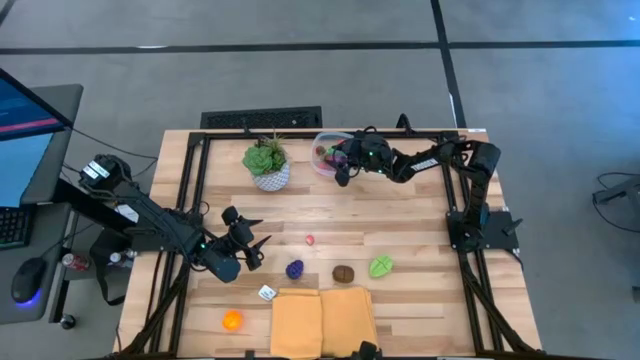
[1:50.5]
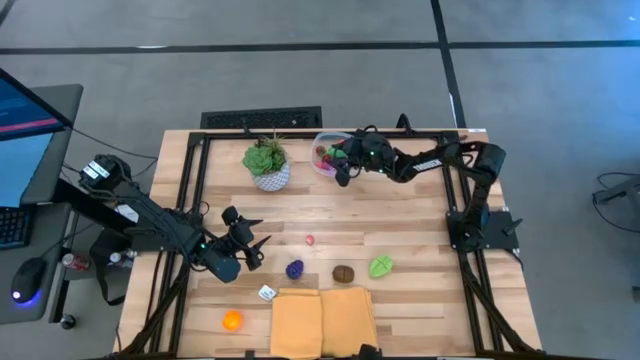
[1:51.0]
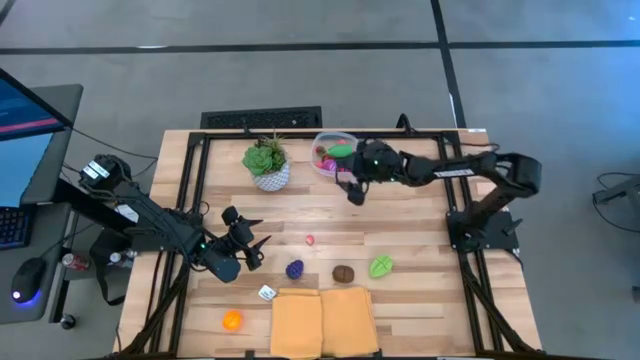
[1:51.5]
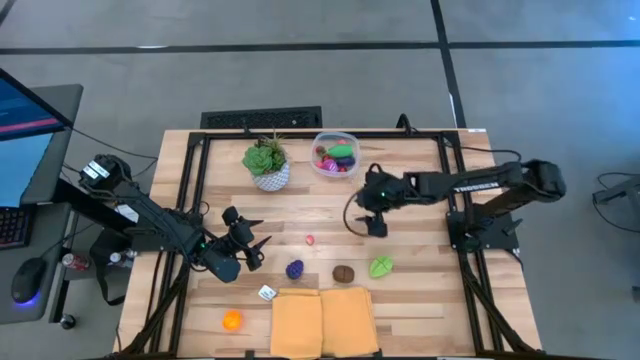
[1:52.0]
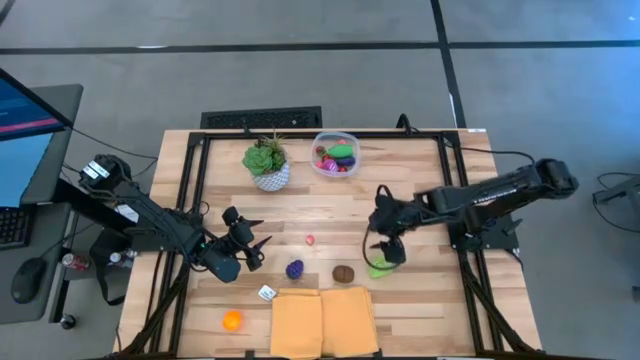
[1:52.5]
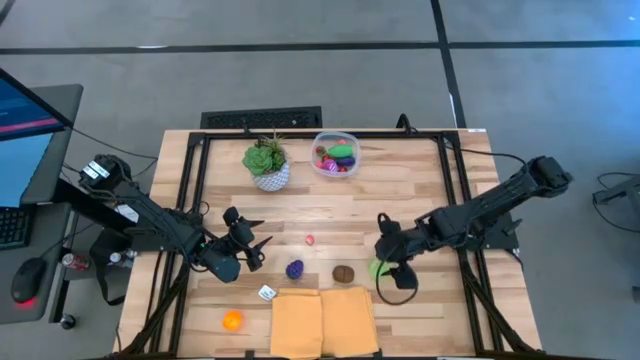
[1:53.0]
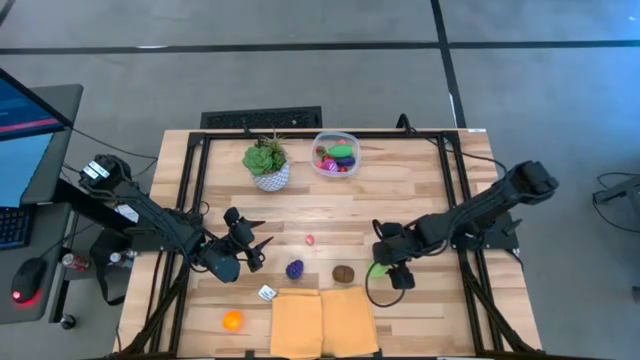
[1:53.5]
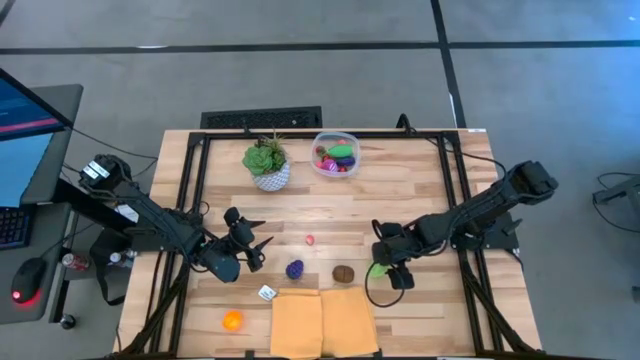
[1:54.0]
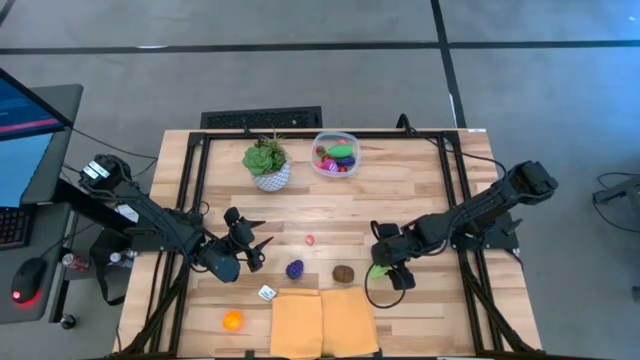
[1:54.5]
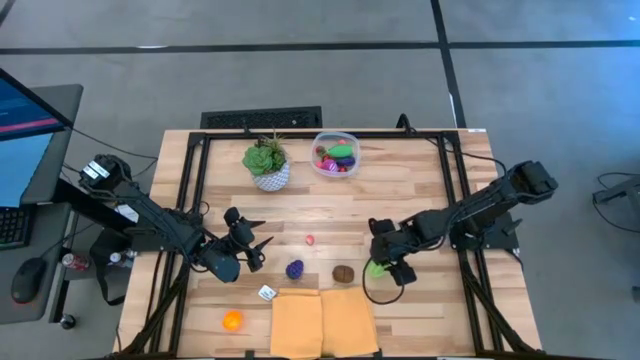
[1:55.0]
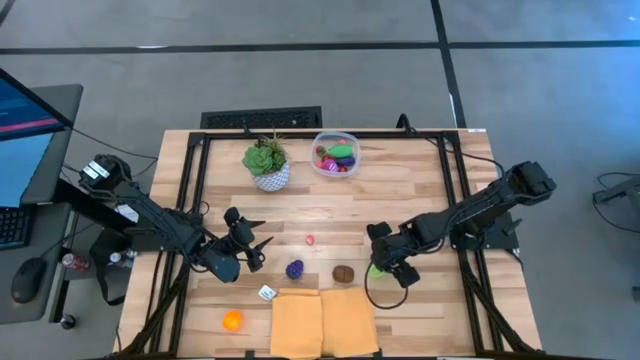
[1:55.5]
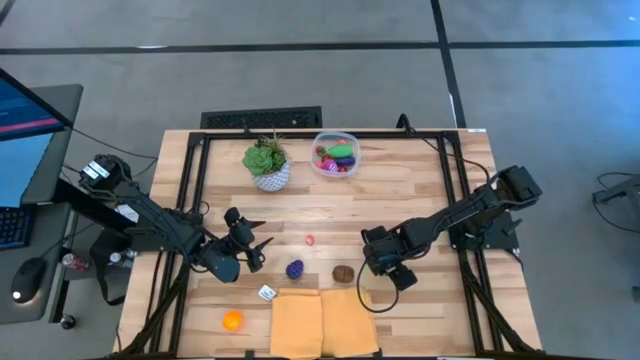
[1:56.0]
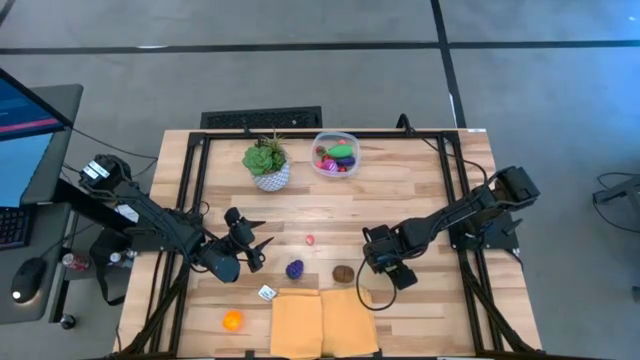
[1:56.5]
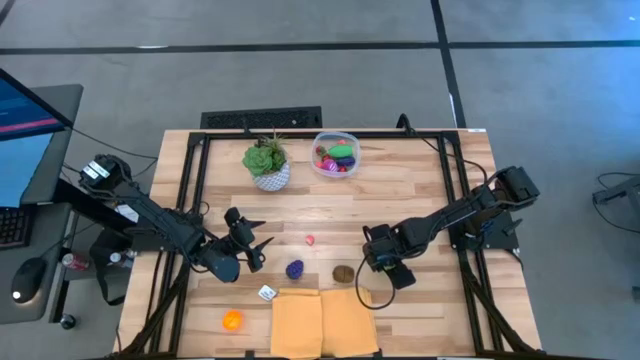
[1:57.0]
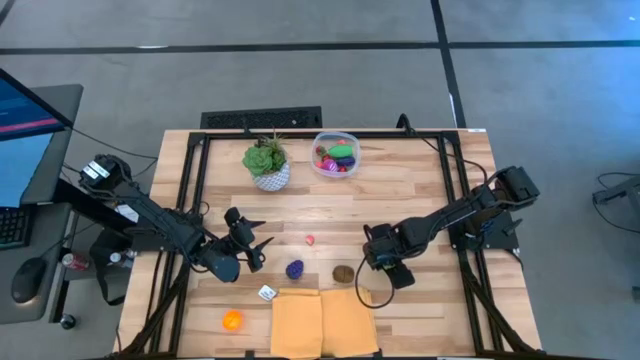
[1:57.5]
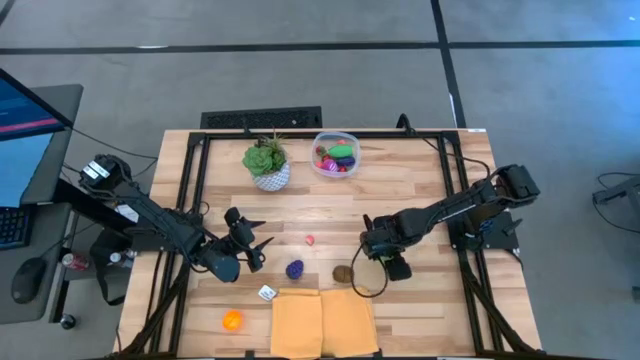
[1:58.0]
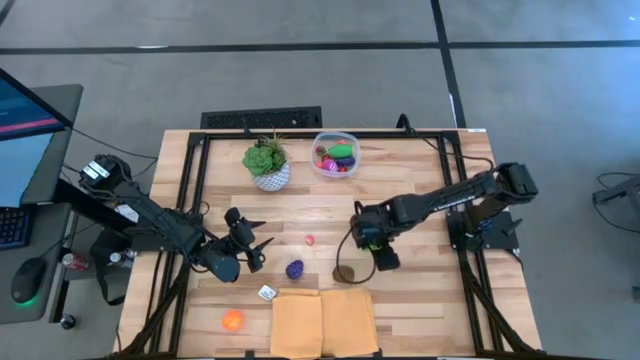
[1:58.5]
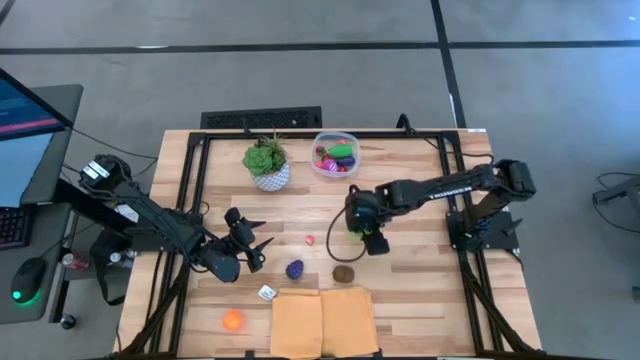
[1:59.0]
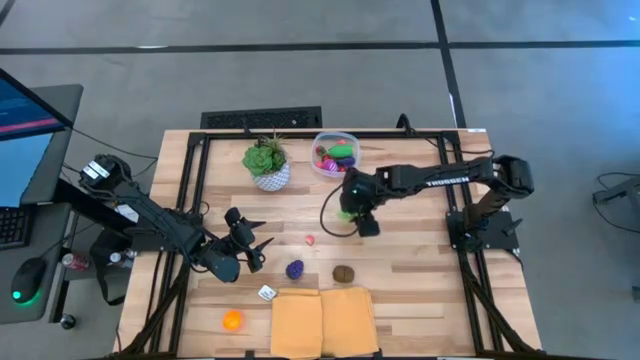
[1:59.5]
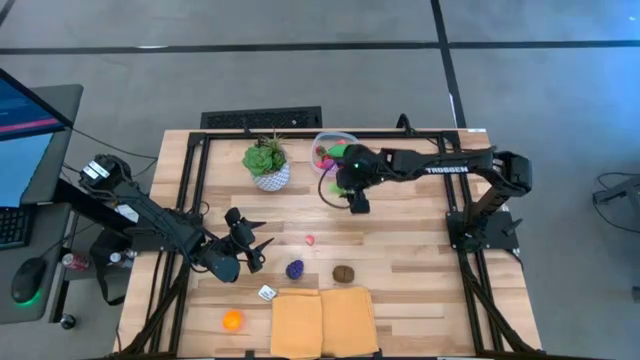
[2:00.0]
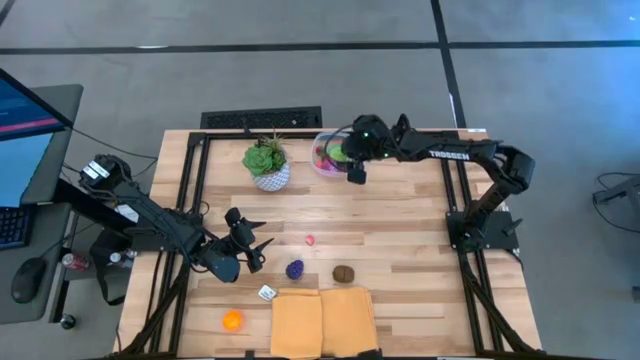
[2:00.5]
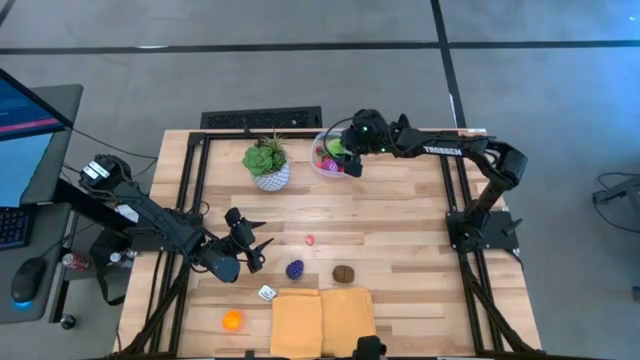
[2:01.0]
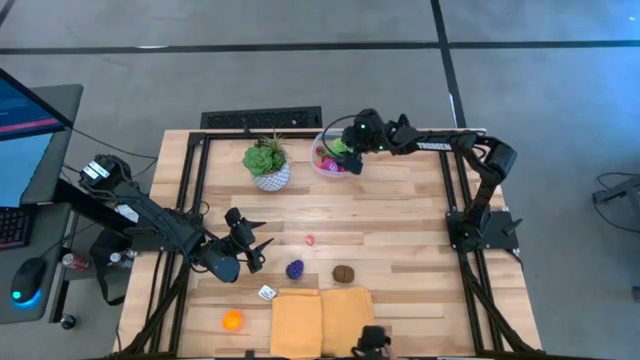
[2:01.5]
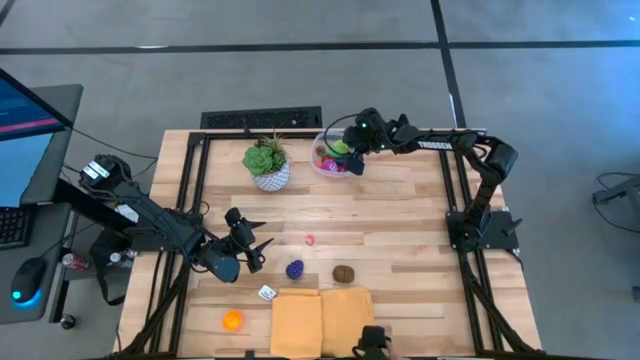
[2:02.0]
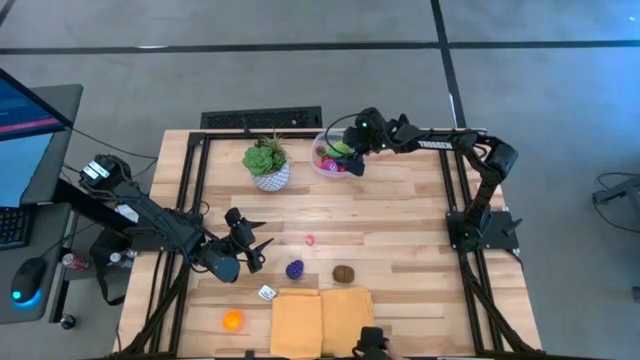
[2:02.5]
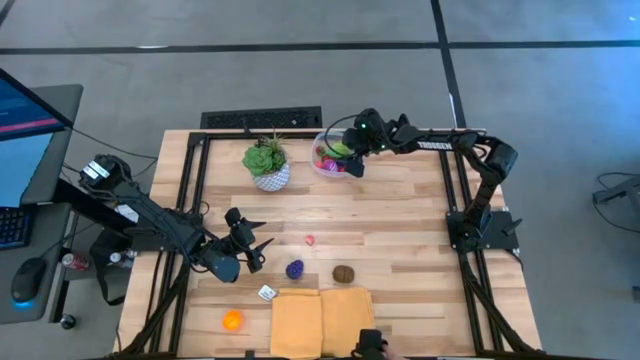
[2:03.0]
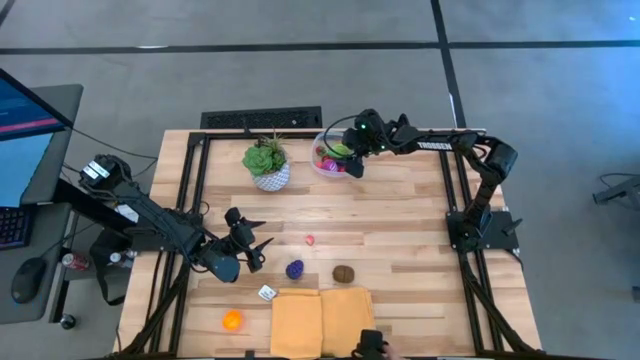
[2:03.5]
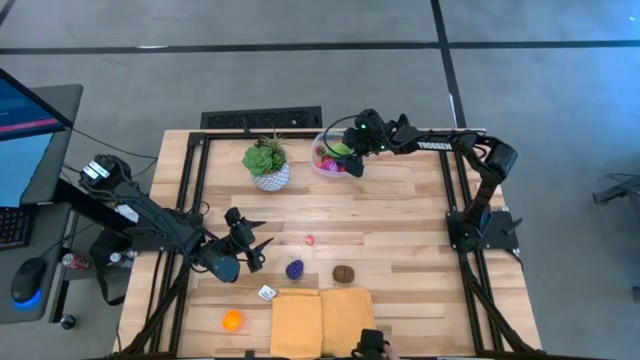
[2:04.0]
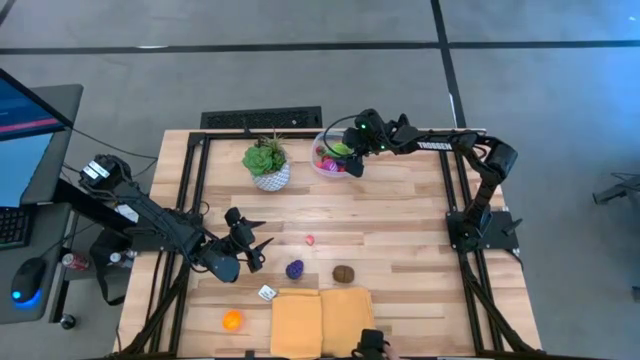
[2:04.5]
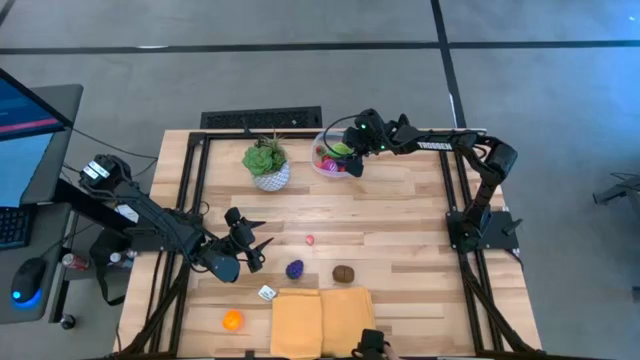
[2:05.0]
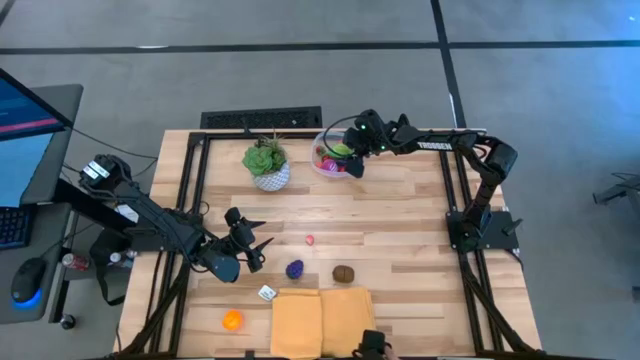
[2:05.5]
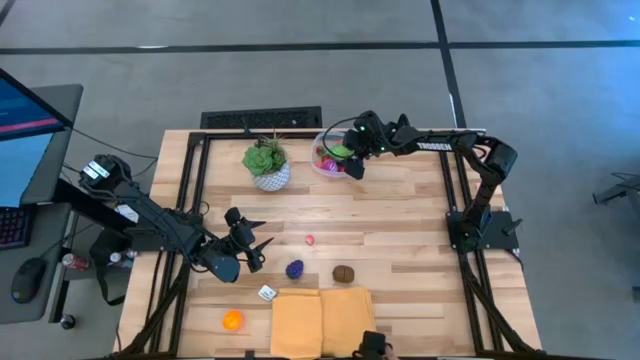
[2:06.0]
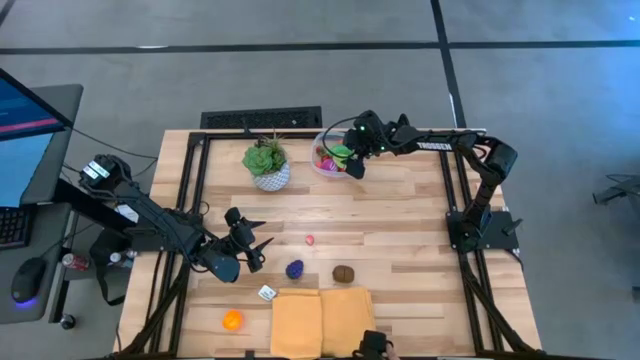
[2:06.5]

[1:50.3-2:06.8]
Task: Pick and placing Produce into tupperware
Put the starfruit into the transparent bin

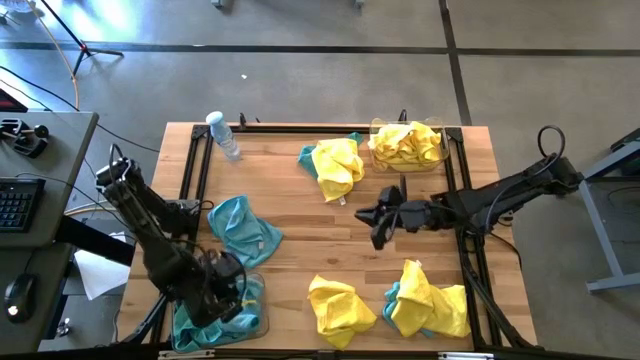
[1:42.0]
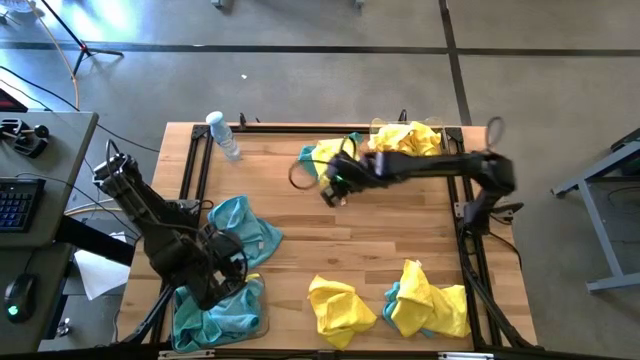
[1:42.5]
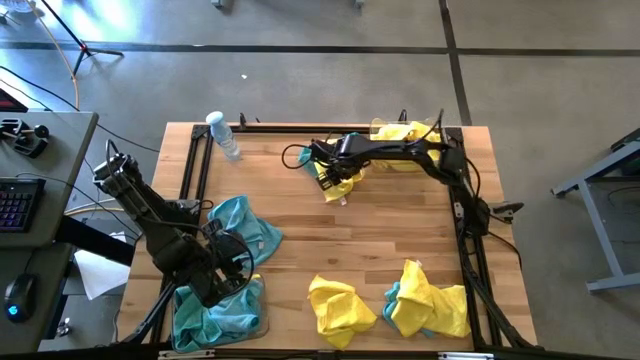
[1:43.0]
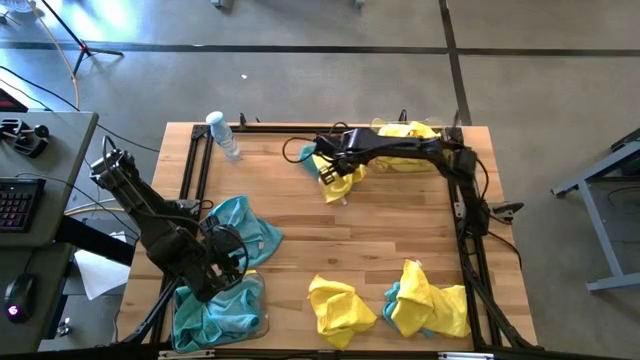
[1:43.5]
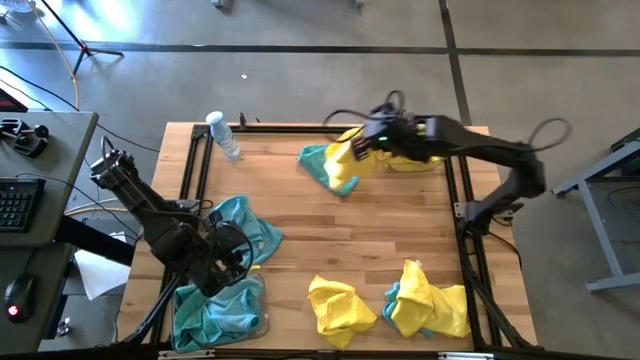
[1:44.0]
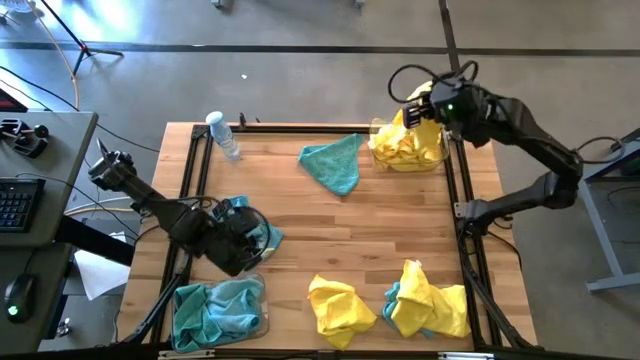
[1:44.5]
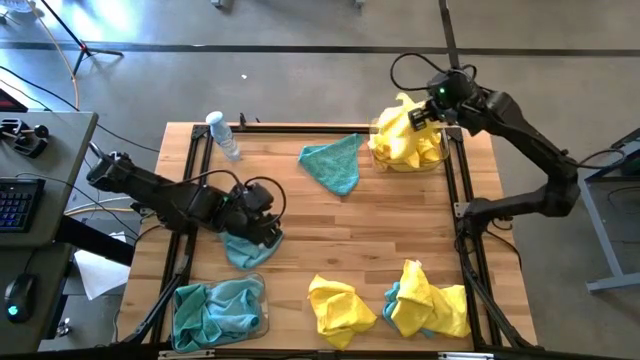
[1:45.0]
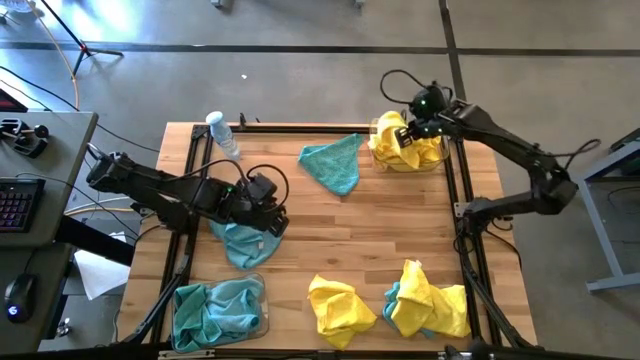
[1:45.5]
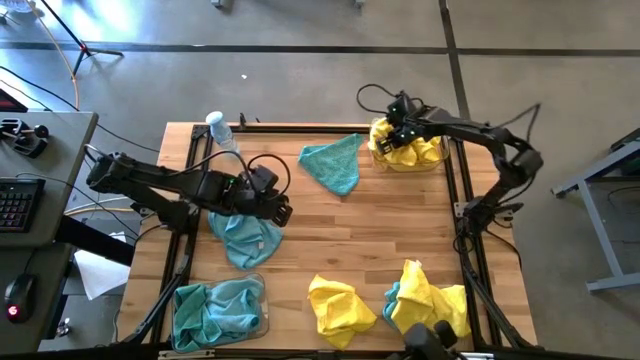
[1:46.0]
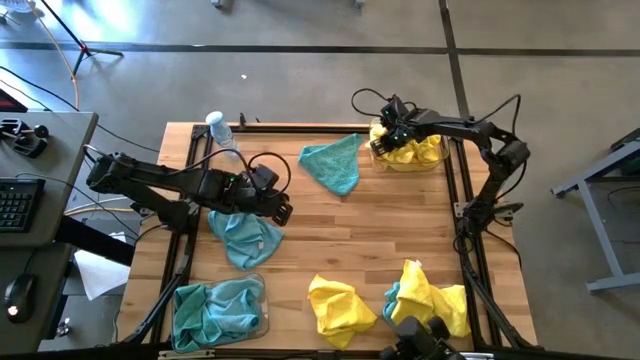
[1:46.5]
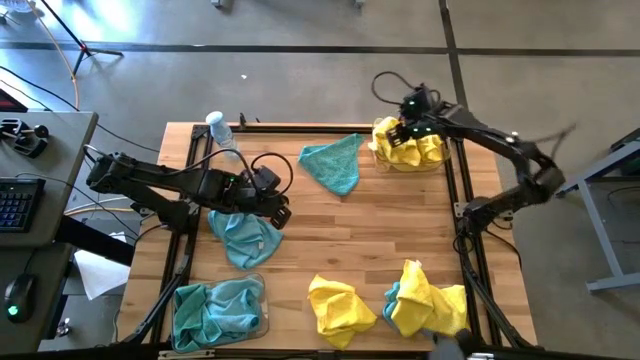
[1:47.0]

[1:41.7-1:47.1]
Task: Sort microfiber towel by color & place in baskets
Put the yellow microfiber towel into the top transparent bin
